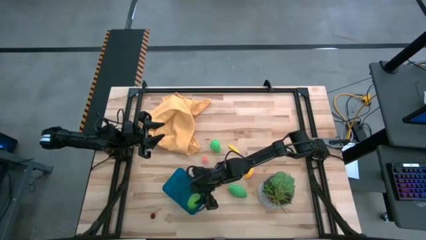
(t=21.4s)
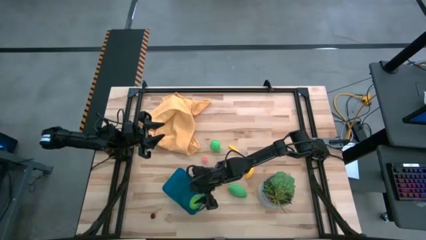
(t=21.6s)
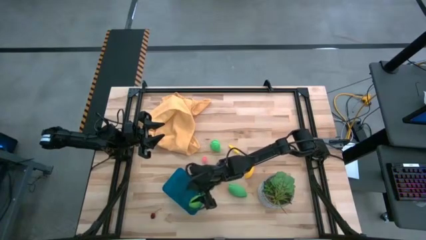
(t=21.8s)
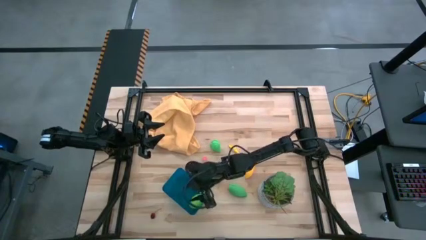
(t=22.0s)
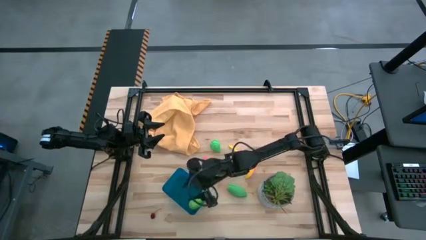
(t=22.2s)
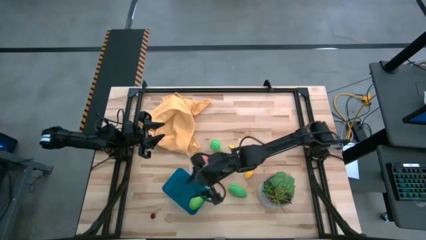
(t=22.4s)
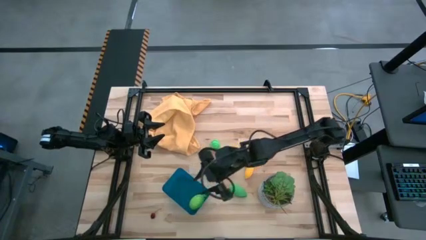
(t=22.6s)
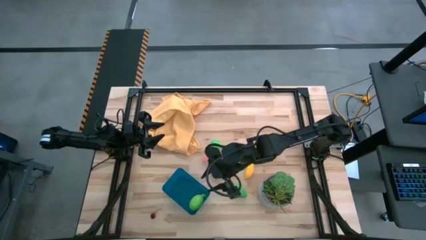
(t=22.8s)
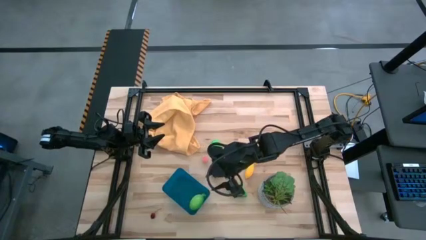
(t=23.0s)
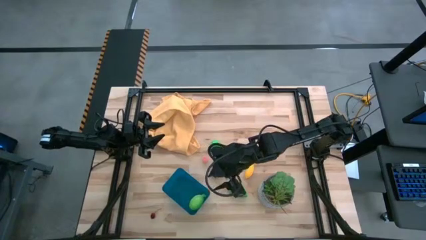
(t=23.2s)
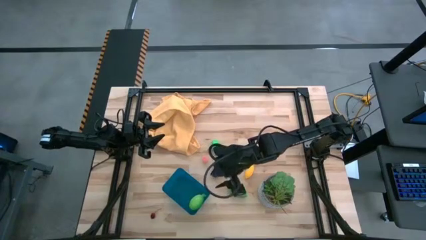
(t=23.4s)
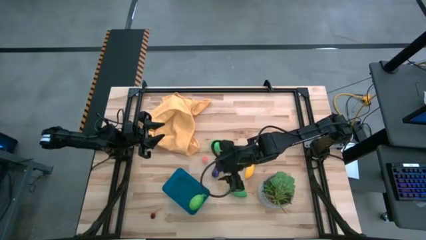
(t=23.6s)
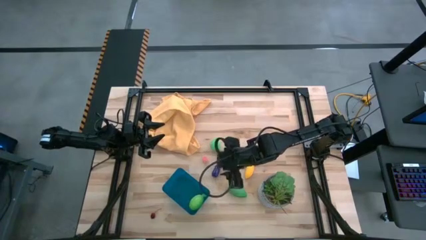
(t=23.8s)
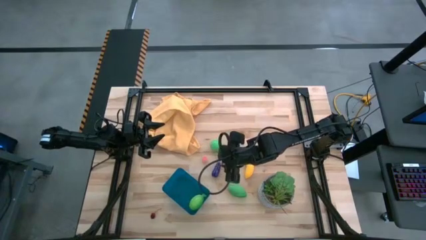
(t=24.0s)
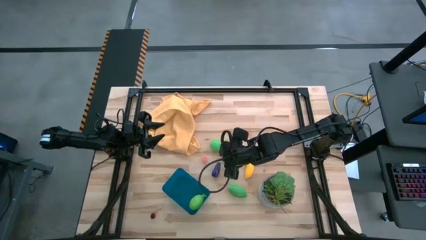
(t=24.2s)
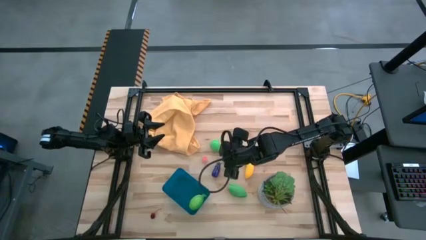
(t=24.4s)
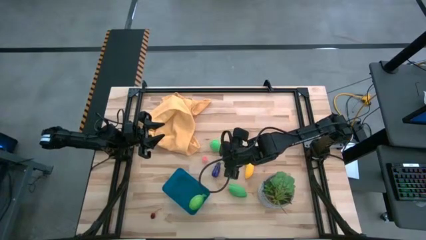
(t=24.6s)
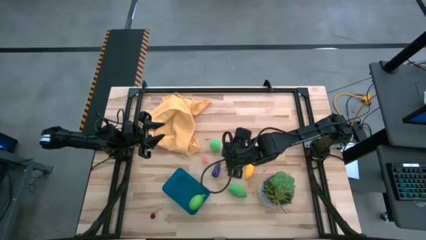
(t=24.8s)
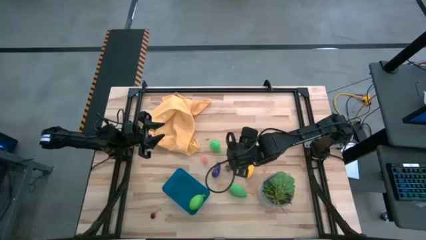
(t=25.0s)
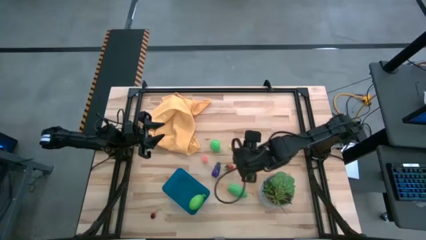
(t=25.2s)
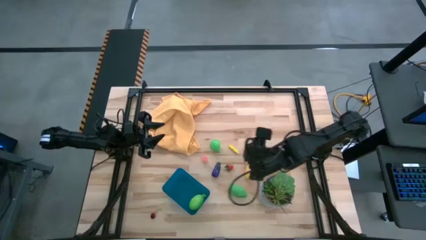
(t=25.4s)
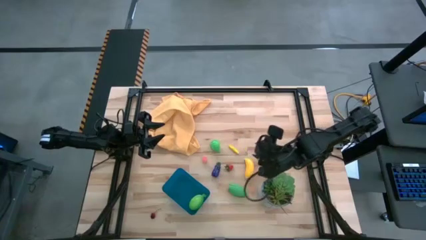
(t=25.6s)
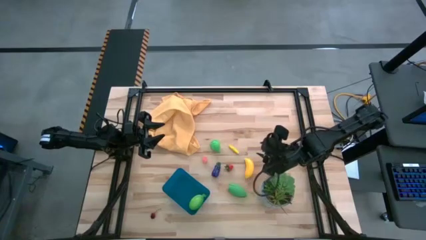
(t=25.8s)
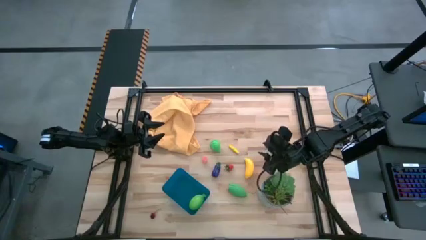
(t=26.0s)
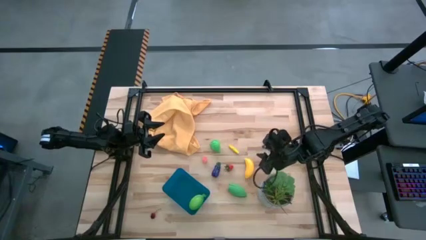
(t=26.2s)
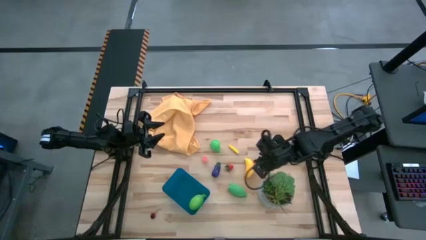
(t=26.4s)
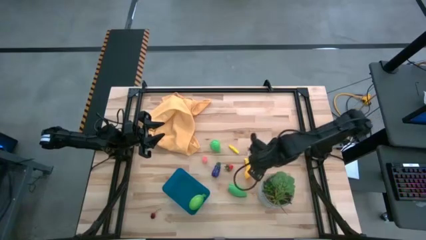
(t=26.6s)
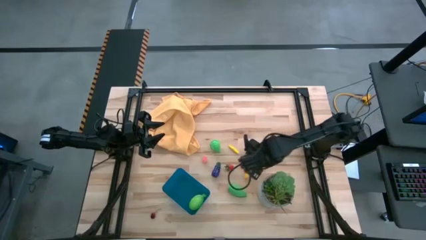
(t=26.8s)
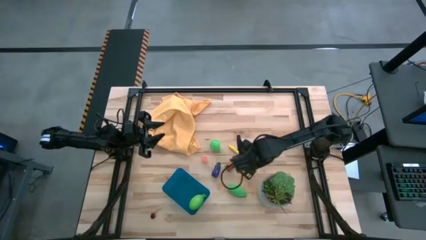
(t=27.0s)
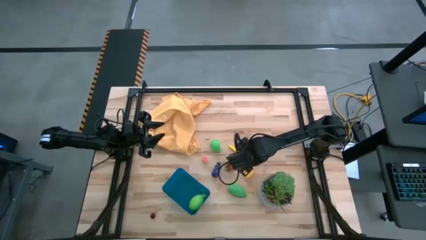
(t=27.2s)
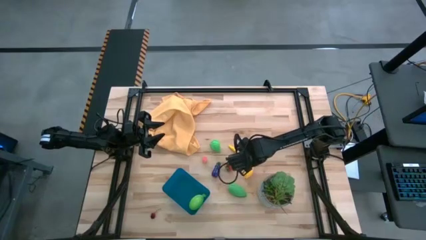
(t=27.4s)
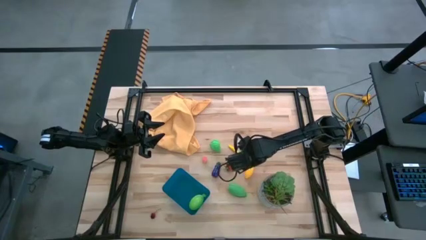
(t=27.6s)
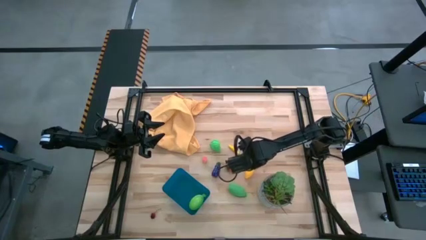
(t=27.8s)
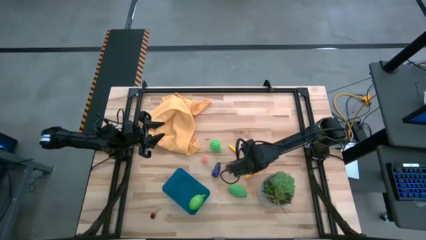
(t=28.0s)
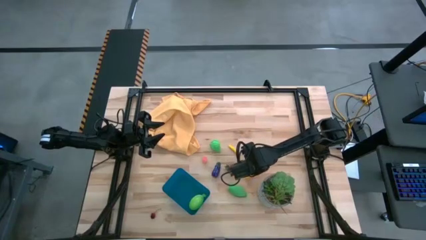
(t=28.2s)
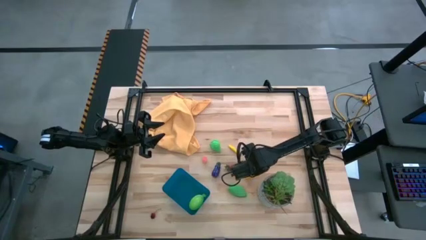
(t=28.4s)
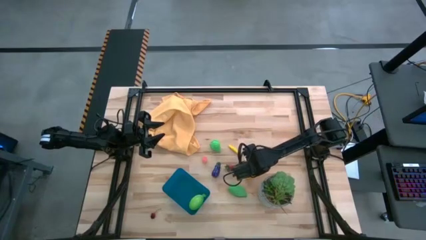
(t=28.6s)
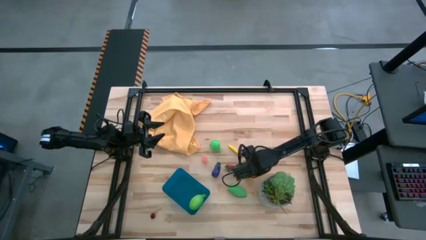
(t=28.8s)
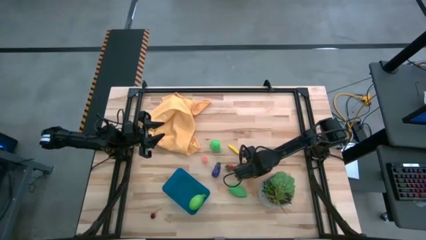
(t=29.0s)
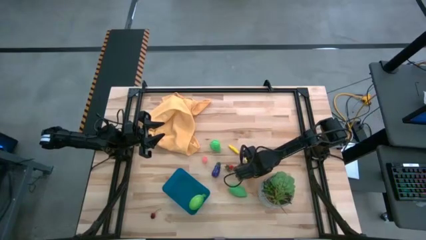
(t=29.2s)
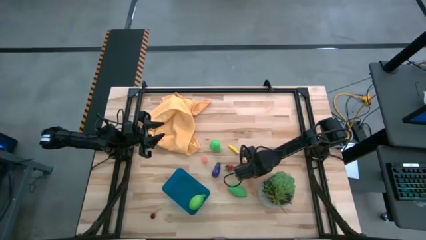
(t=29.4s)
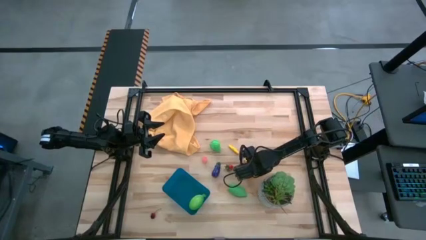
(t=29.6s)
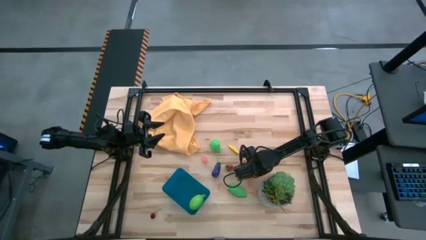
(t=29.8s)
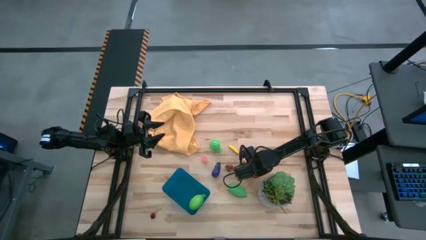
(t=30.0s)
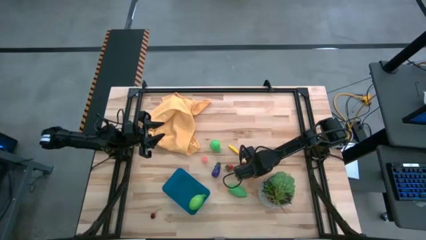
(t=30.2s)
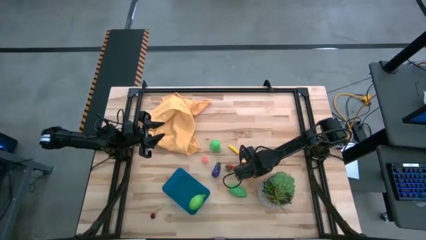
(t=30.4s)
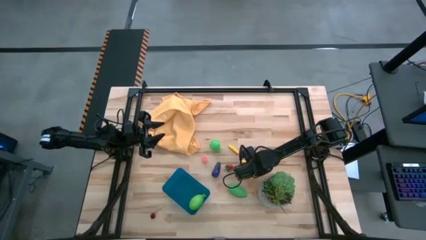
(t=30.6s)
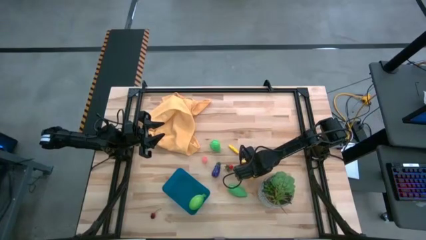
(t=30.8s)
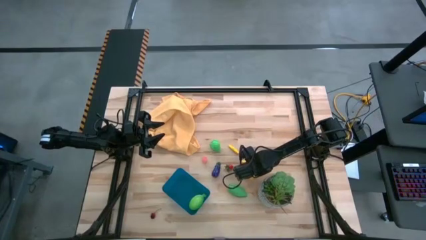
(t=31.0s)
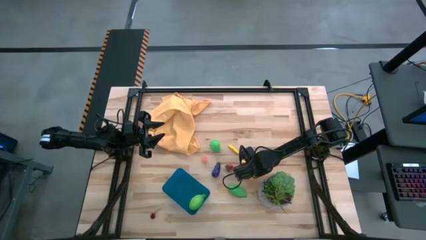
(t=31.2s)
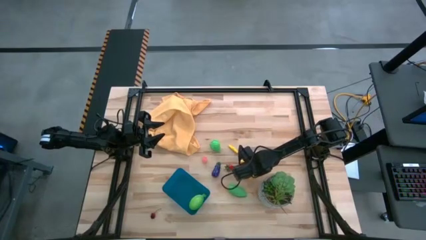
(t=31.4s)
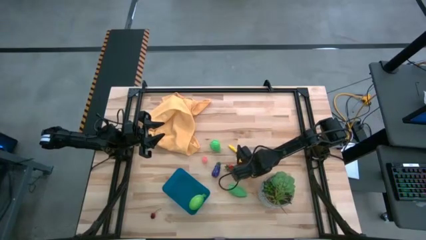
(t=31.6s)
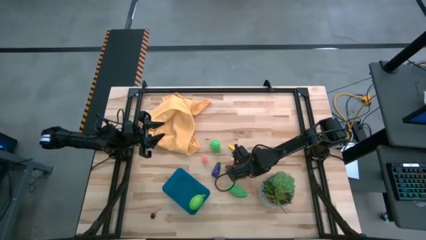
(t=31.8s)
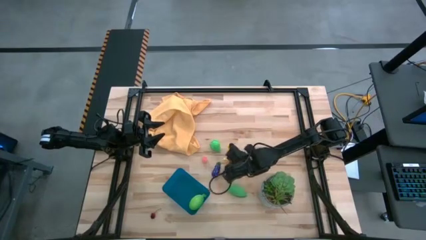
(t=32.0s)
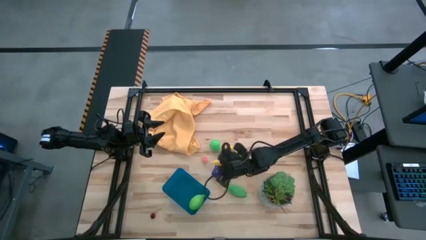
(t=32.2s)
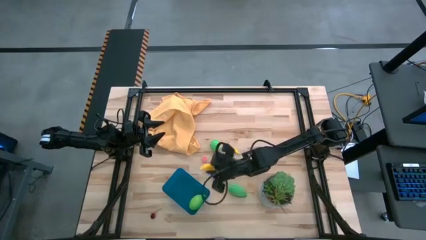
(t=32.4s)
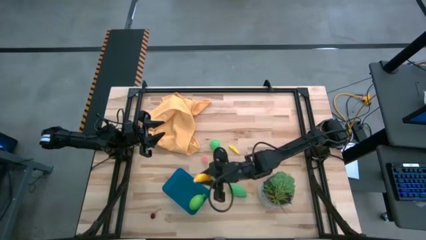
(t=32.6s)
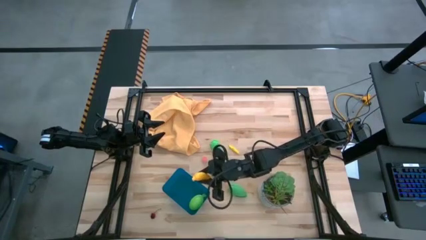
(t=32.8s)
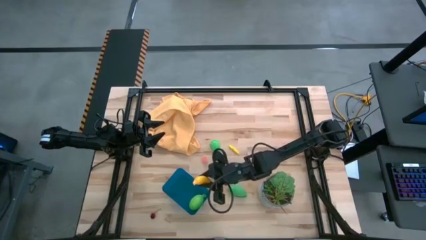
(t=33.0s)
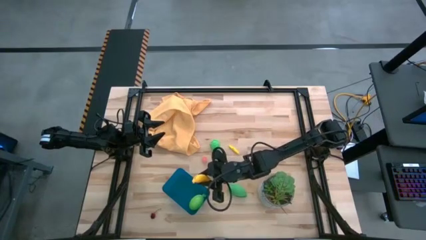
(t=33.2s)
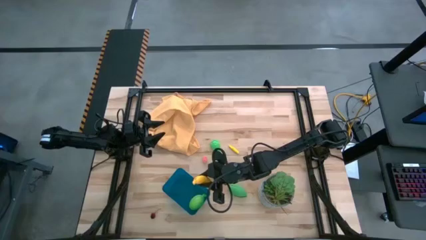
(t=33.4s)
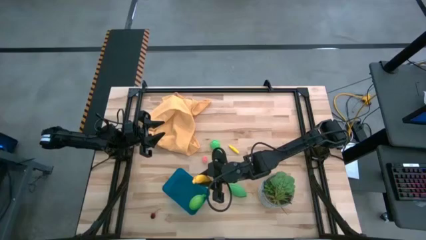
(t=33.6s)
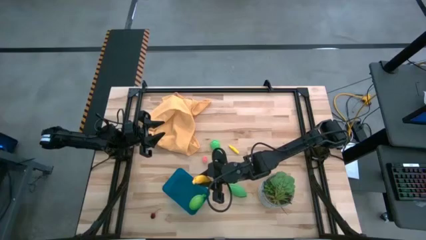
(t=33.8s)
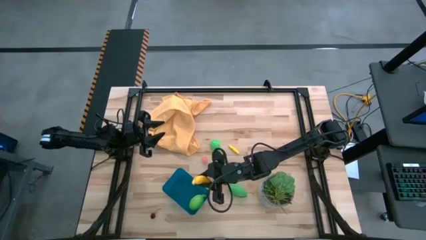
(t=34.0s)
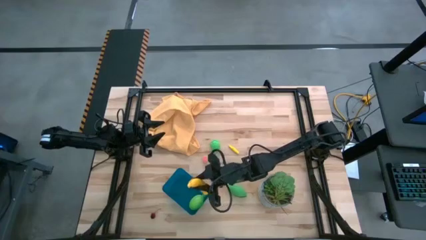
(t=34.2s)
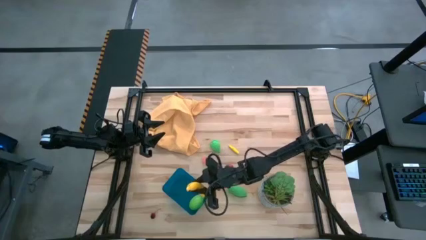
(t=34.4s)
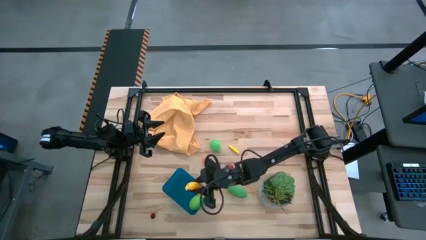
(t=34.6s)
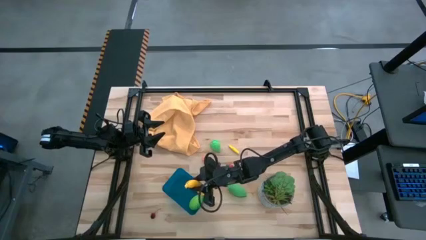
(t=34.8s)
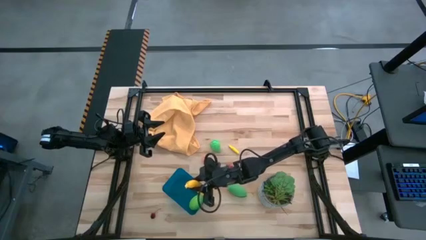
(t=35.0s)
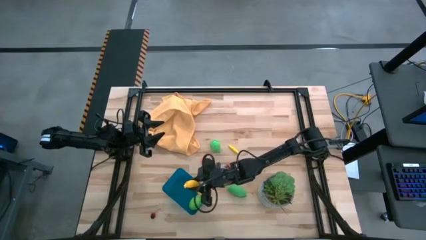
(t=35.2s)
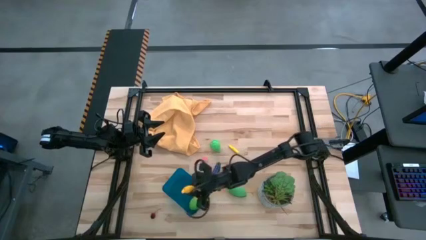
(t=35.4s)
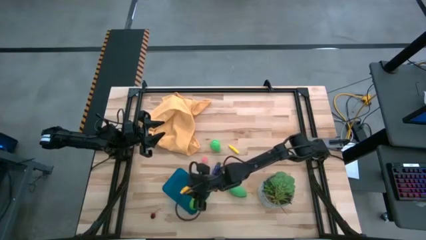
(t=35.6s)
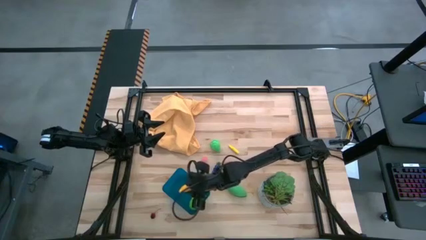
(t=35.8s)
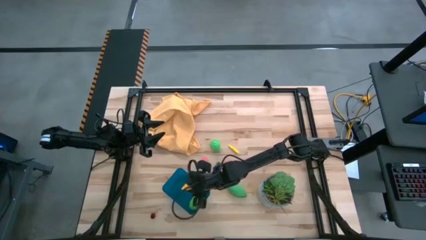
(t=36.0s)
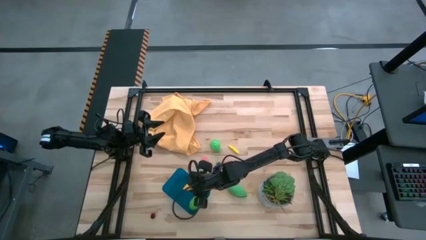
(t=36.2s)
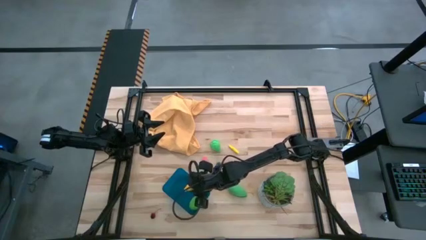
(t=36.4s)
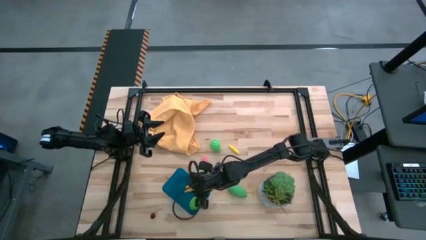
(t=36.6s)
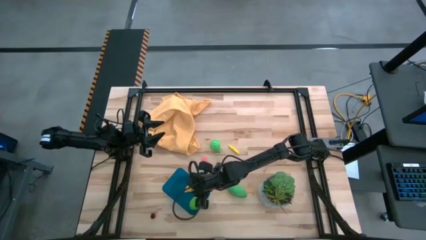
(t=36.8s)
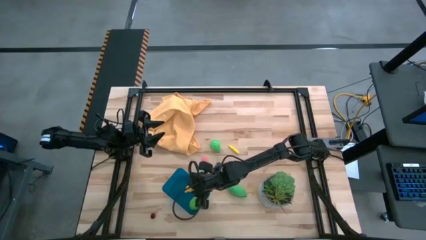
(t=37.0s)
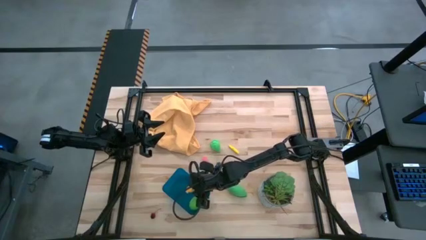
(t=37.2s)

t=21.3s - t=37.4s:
Task: Pick and placing Produce into tupperware
Put the banana into the blue bin

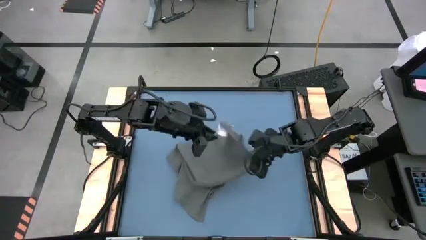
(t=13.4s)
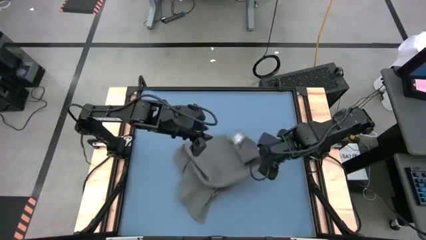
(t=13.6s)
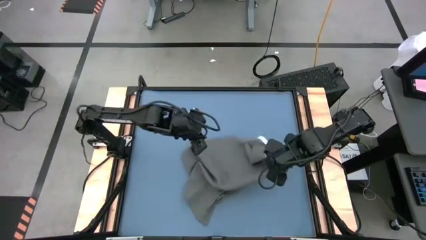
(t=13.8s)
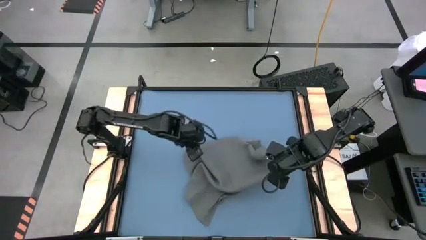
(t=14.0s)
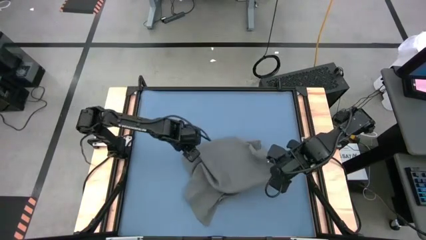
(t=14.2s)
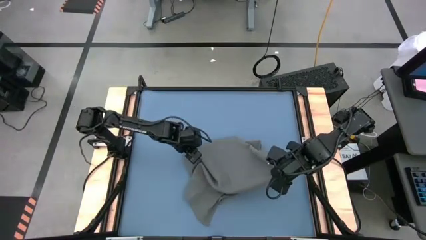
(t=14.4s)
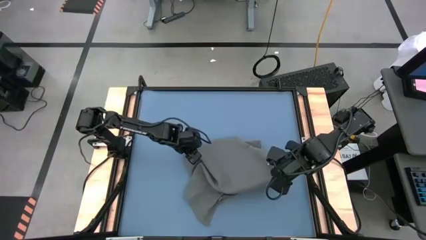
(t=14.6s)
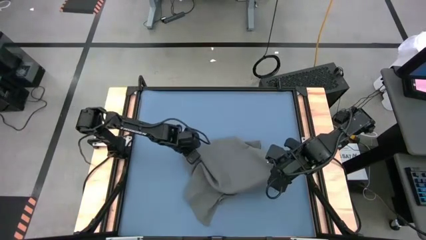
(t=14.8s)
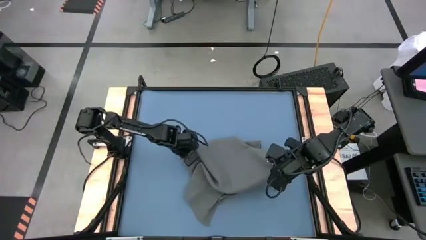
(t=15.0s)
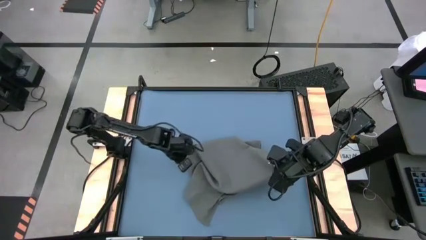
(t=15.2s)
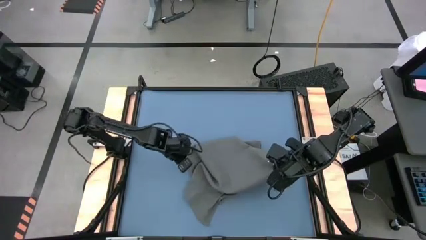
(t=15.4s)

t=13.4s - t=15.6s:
Task: Roll towel
Fold the gray towel
